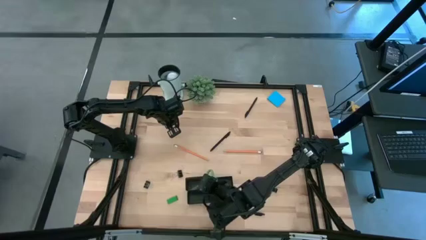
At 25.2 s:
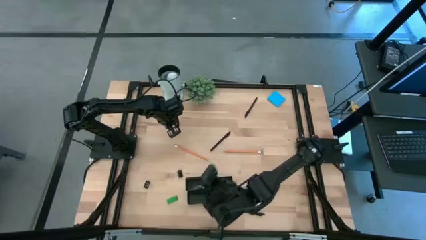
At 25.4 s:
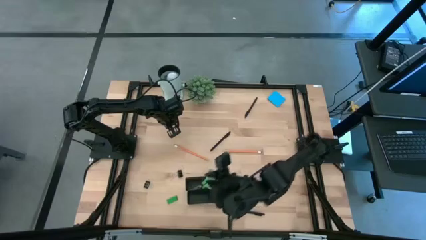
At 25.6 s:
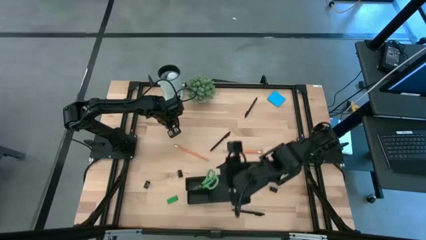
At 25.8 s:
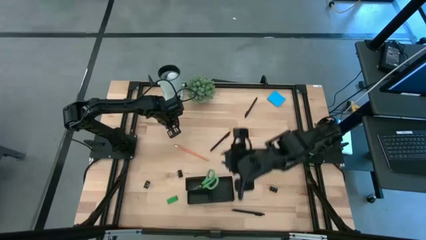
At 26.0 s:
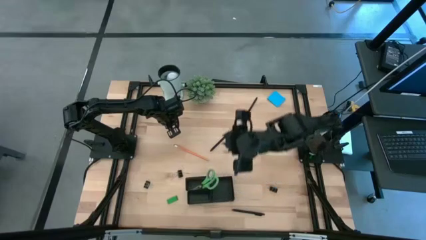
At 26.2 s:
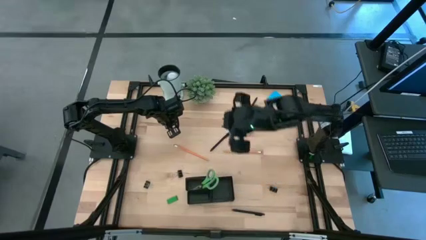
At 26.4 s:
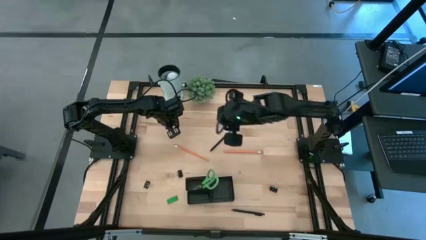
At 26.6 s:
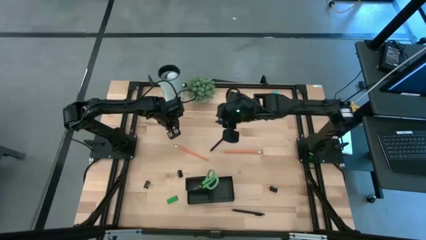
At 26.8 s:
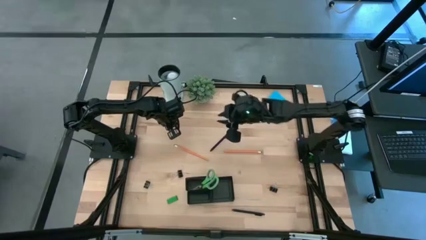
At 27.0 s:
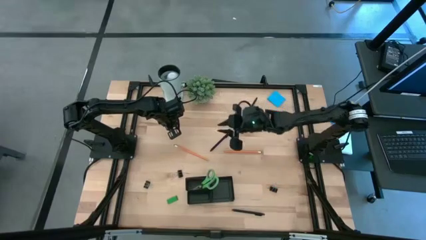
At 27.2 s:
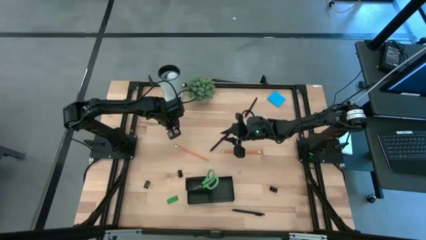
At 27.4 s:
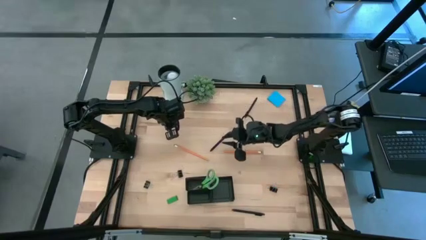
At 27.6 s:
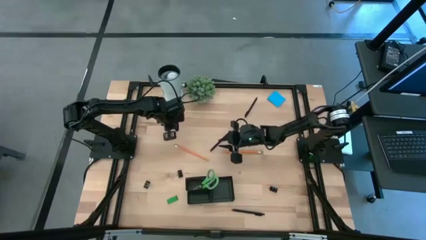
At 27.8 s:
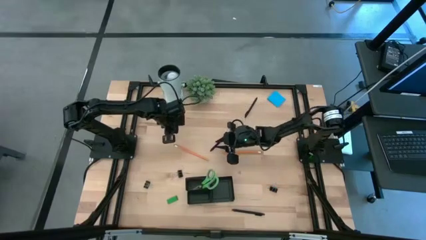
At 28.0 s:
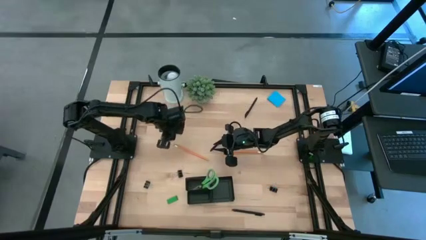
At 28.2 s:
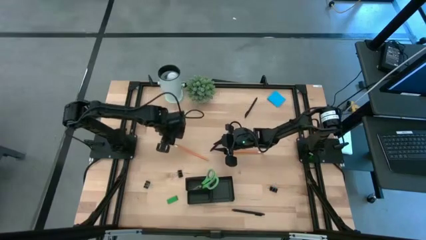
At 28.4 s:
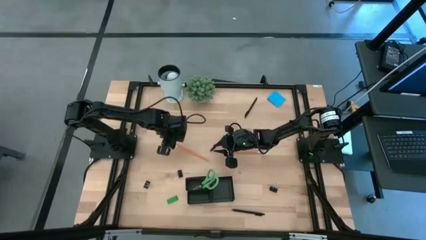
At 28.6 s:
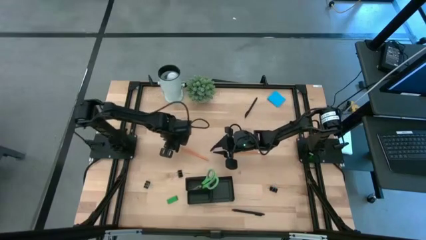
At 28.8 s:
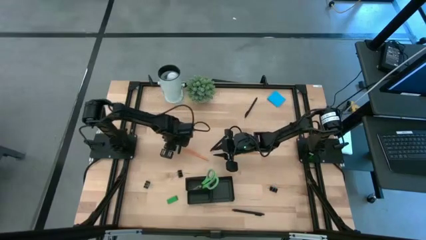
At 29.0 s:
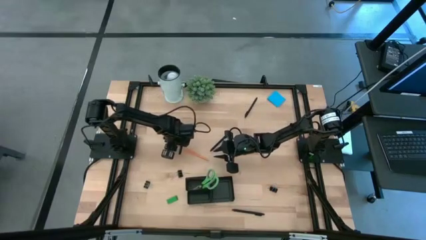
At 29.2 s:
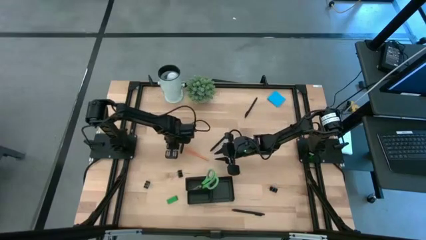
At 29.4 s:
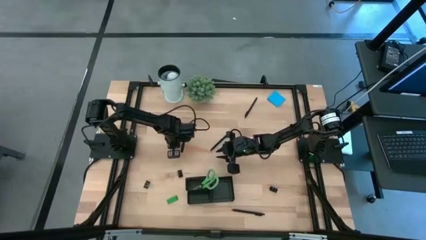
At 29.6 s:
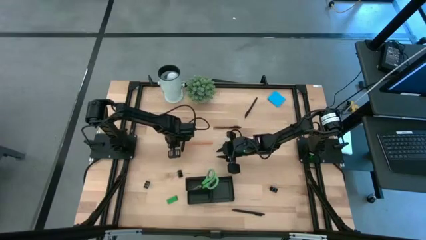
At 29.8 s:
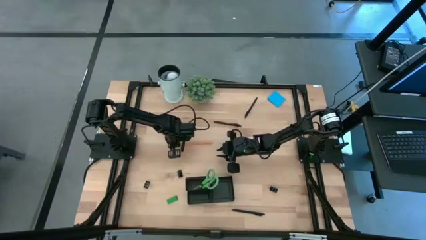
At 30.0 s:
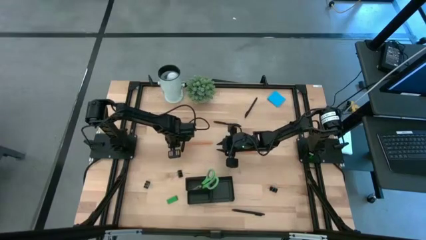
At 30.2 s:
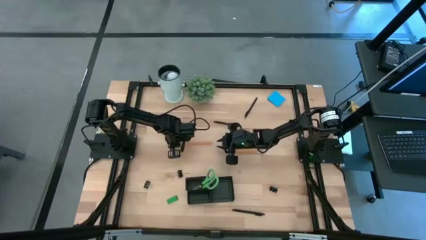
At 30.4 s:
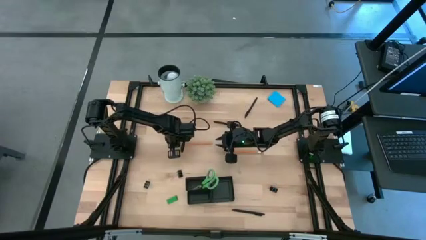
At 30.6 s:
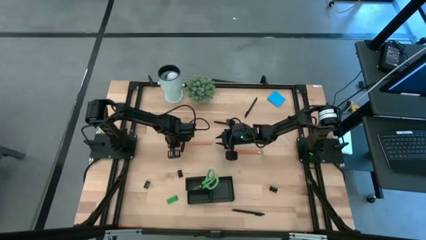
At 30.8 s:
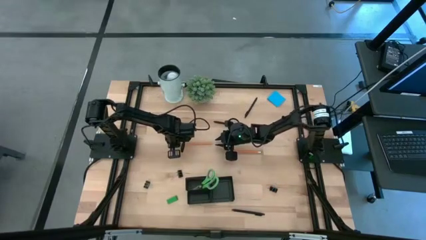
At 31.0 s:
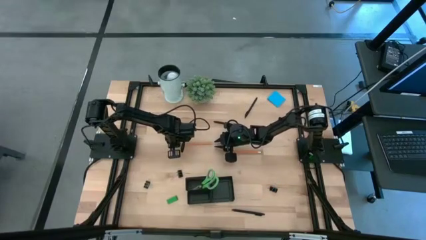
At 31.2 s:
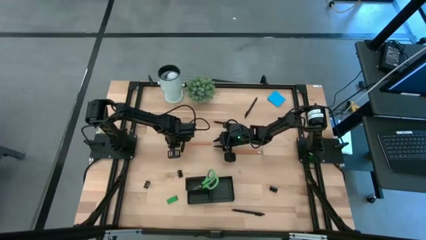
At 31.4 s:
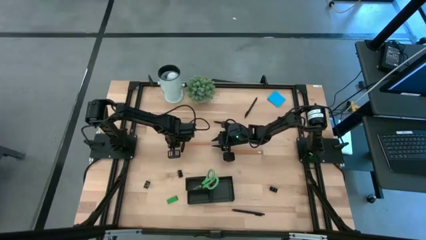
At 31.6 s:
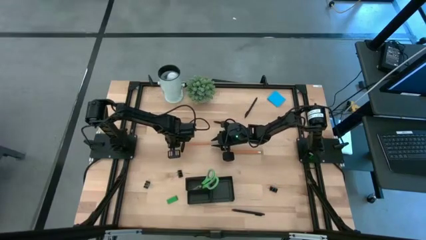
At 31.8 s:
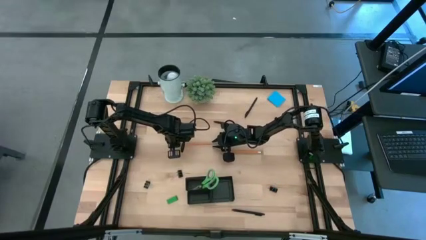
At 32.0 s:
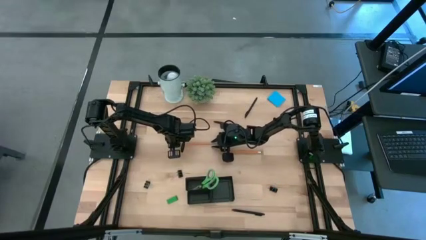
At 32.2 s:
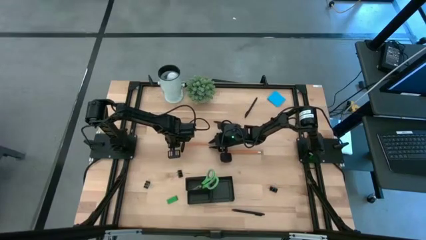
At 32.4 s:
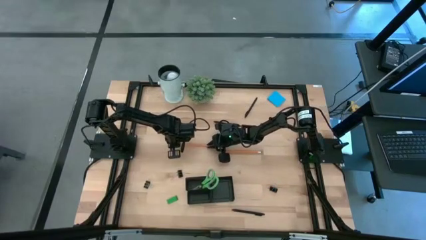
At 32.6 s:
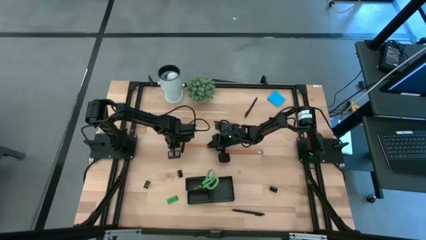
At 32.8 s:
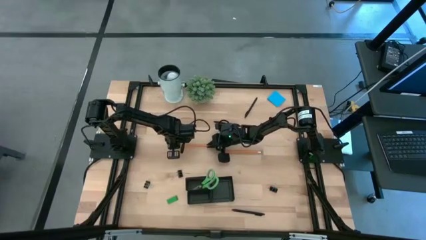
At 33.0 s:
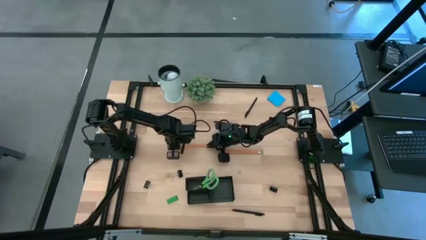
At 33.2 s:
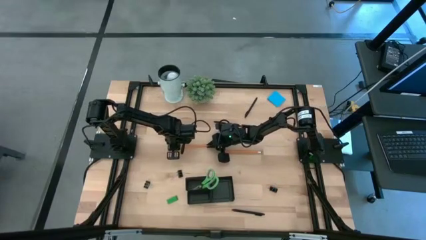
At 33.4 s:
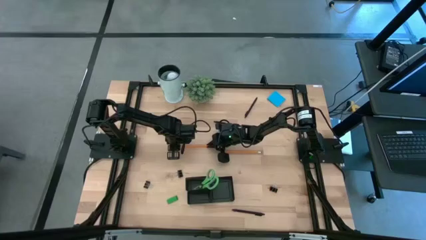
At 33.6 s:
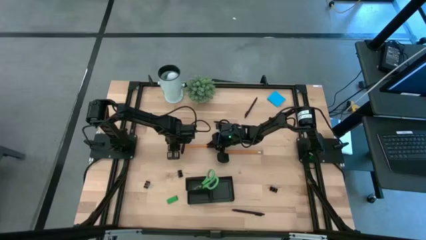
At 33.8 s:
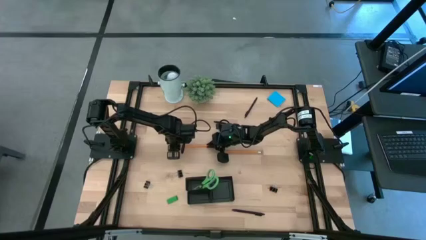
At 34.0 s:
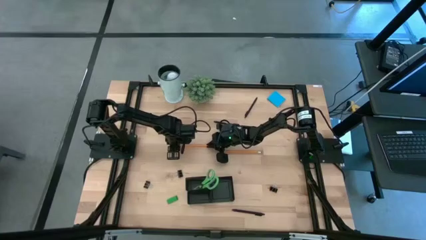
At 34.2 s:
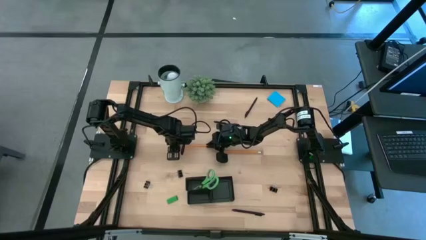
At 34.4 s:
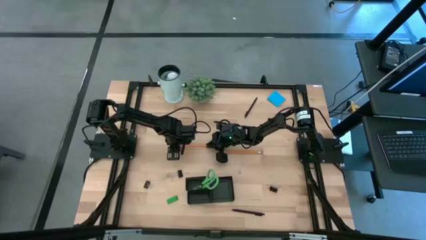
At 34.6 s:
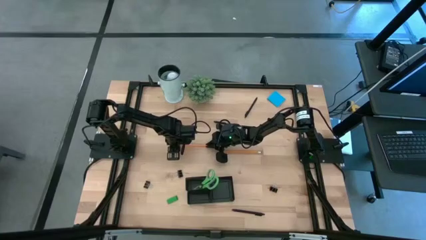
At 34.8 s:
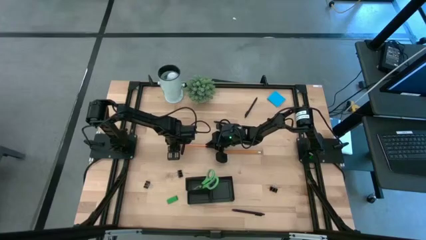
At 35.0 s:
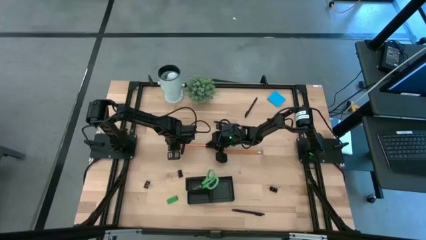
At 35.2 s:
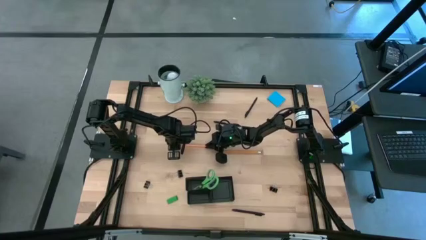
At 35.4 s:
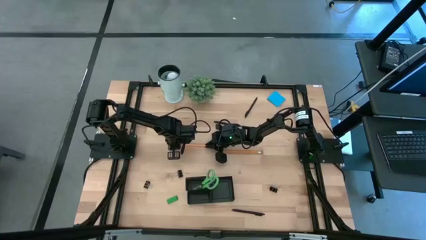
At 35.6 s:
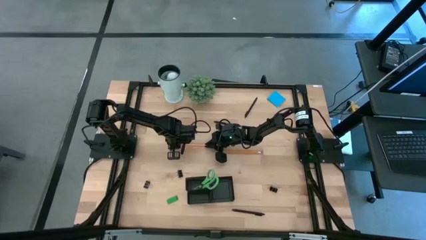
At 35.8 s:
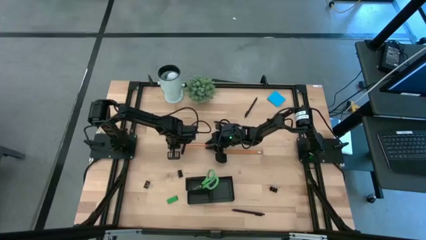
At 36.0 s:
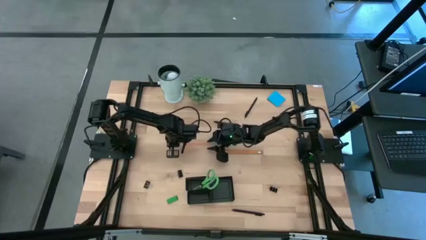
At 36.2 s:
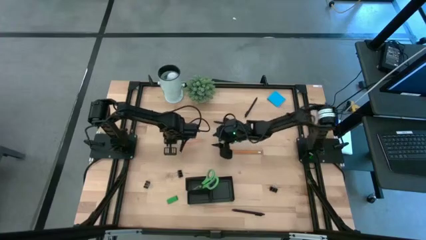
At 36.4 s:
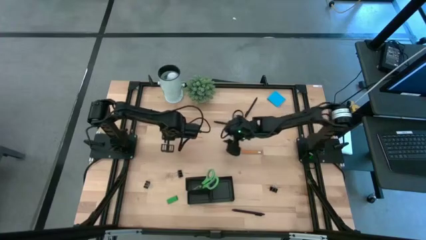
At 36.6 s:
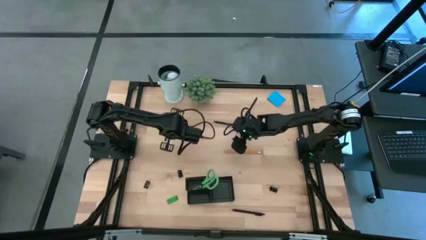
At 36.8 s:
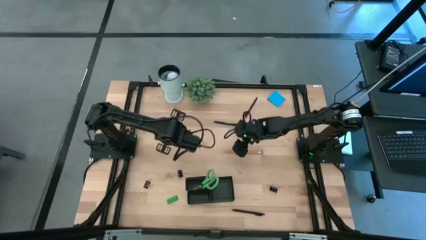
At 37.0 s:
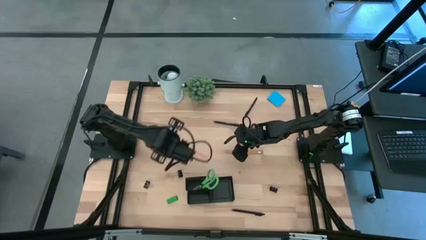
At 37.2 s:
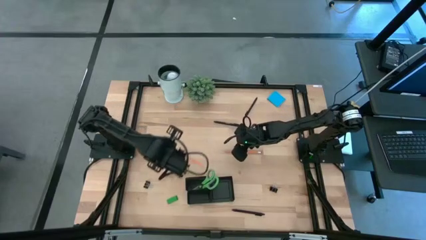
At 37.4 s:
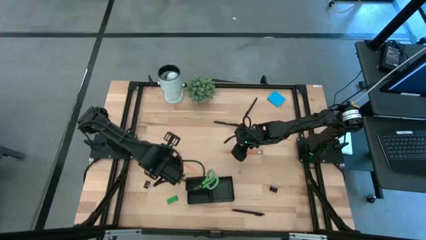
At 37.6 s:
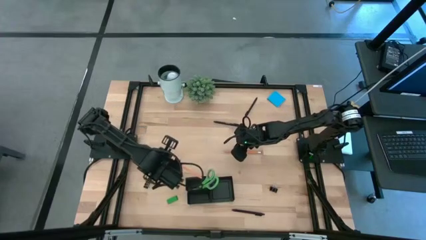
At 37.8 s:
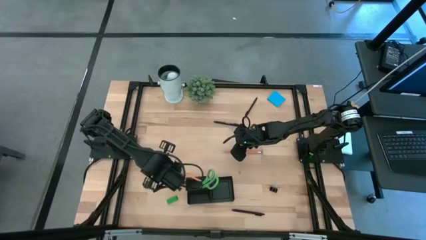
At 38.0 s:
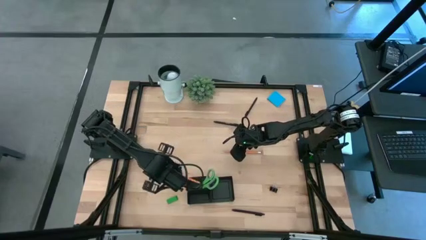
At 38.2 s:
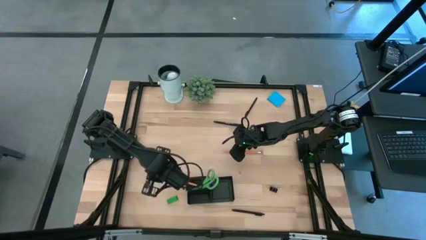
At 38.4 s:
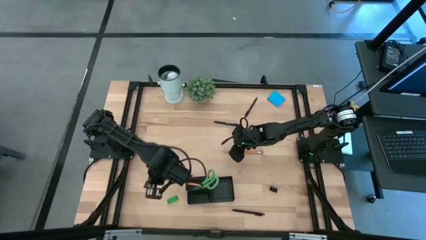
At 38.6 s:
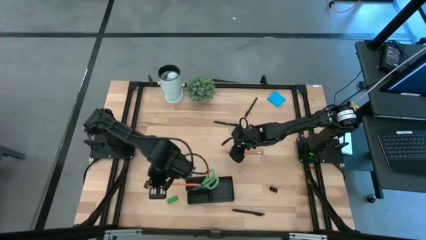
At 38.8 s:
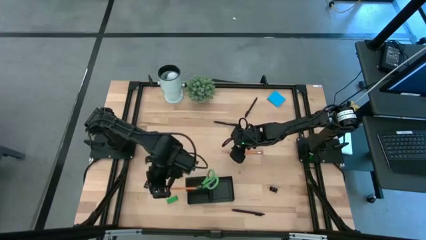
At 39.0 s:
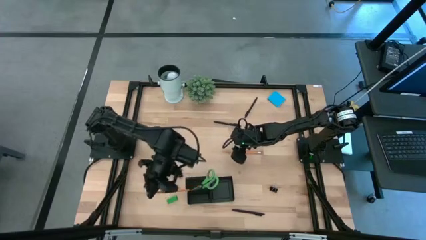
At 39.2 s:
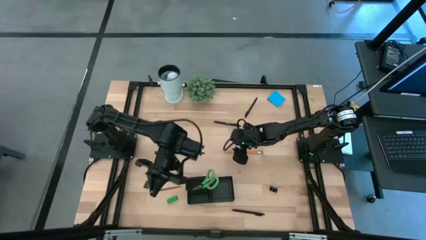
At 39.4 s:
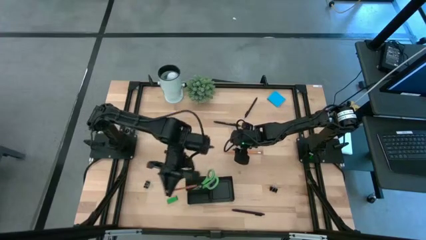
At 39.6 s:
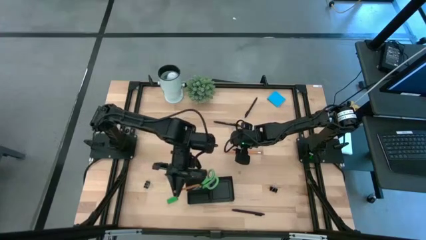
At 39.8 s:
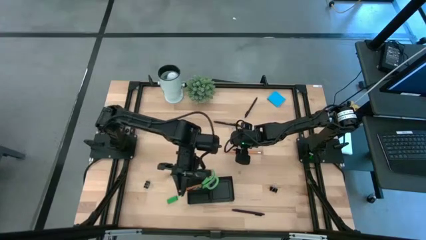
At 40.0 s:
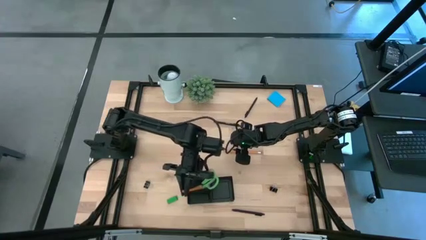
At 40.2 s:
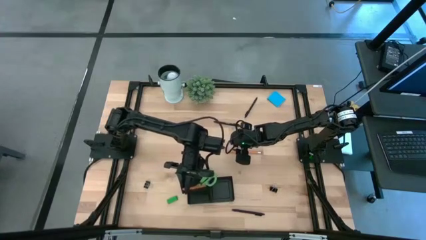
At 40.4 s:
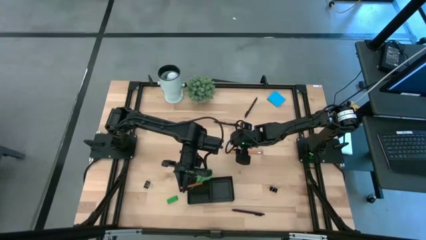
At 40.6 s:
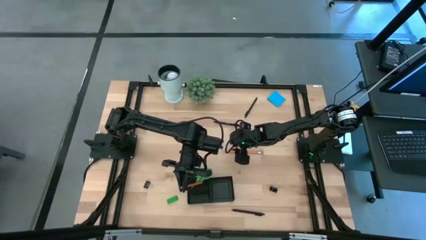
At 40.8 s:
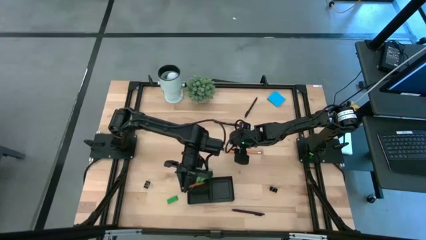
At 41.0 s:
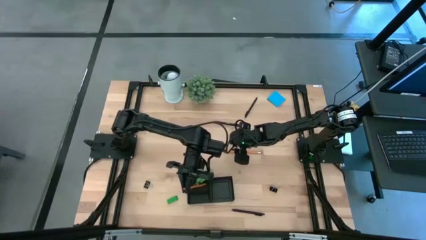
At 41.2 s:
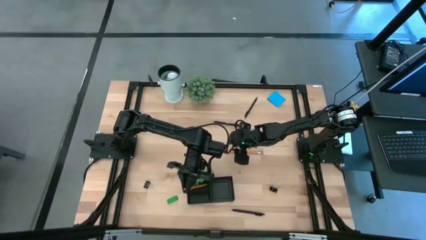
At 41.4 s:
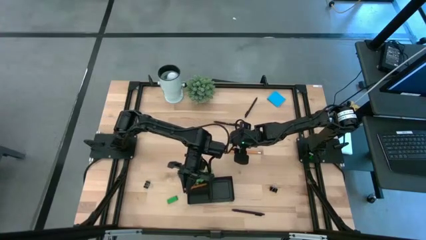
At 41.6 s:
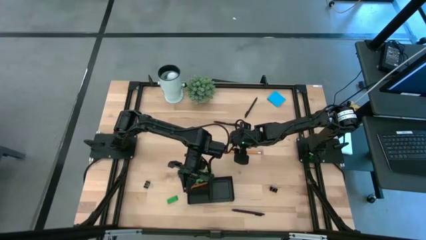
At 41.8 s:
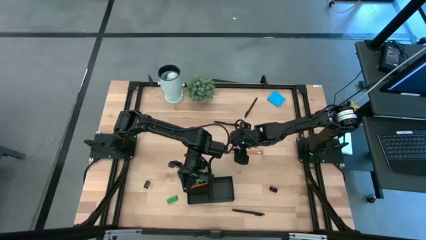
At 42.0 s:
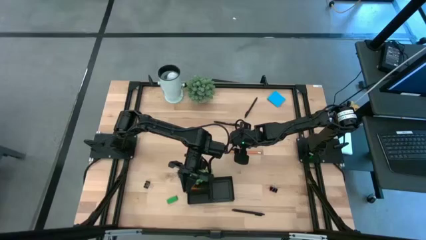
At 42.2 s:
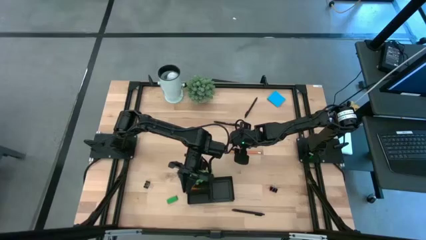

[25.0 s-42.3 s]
Task: Pick and place office supplies into organizer
Put the left orange pencil into the black desk organizer
